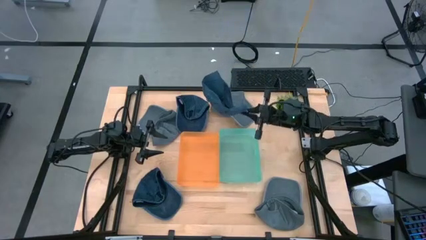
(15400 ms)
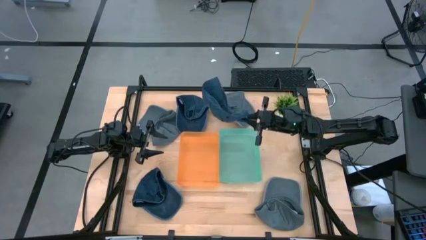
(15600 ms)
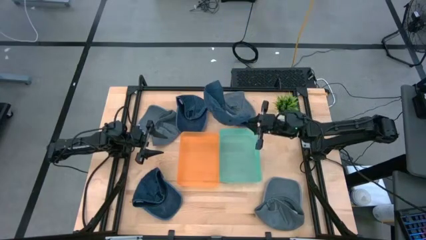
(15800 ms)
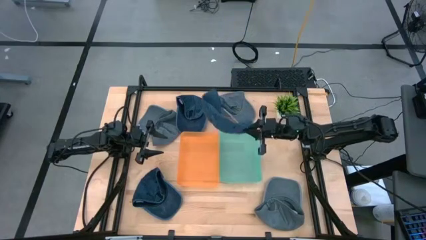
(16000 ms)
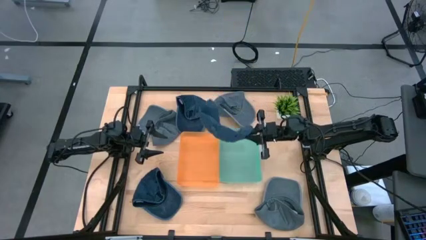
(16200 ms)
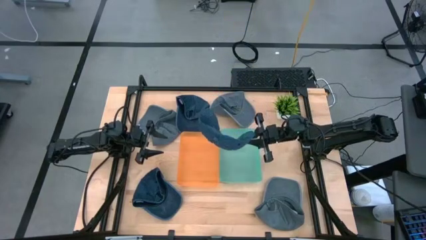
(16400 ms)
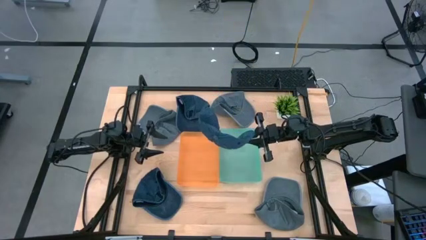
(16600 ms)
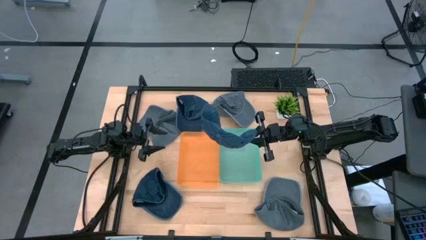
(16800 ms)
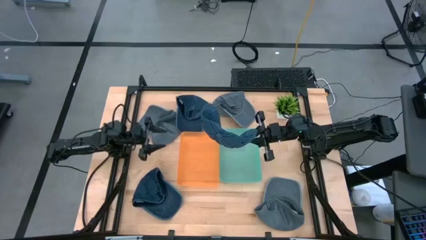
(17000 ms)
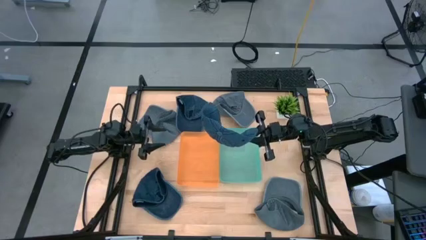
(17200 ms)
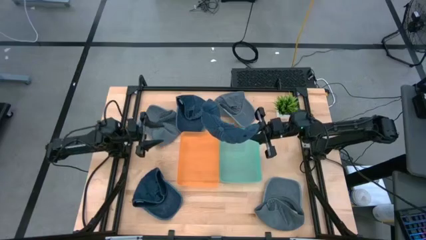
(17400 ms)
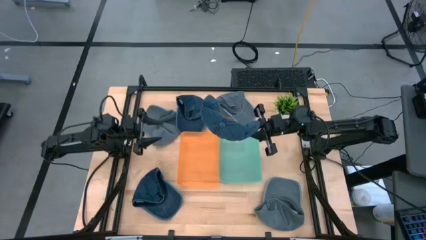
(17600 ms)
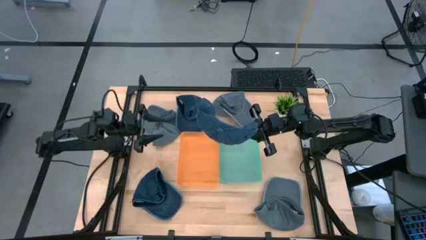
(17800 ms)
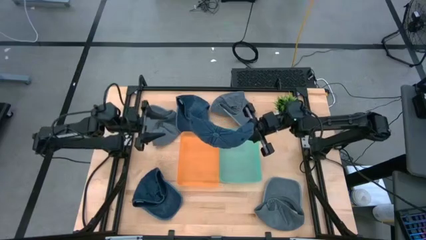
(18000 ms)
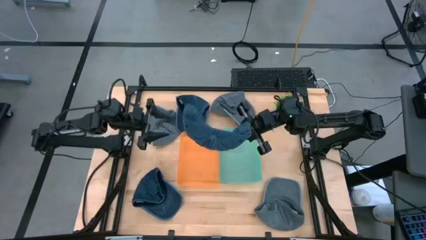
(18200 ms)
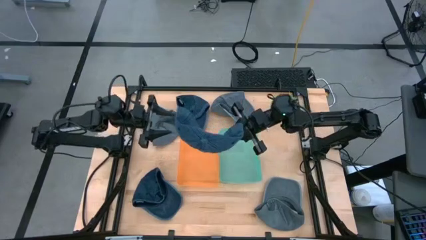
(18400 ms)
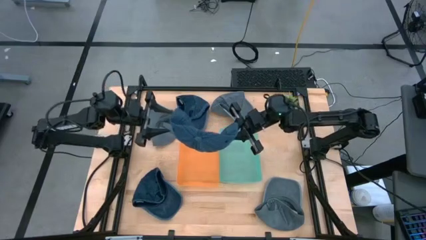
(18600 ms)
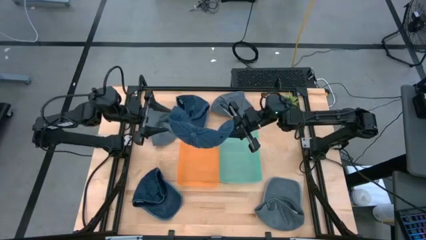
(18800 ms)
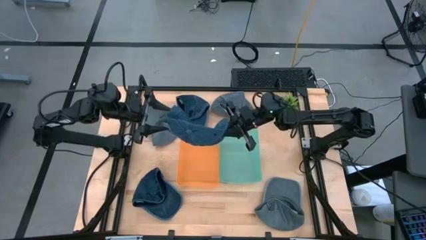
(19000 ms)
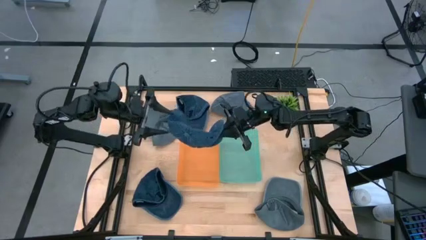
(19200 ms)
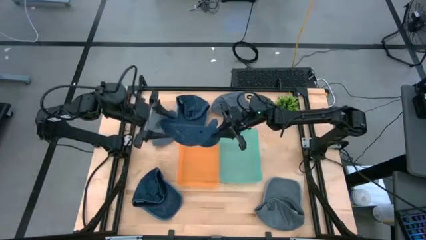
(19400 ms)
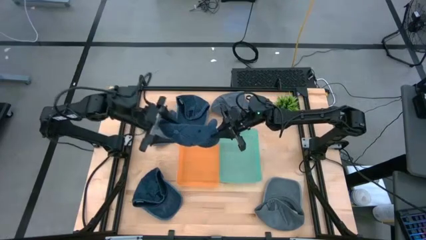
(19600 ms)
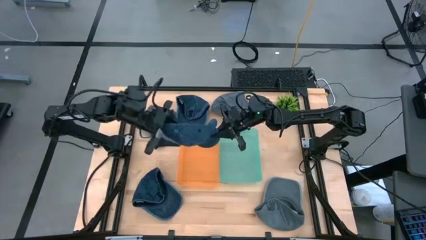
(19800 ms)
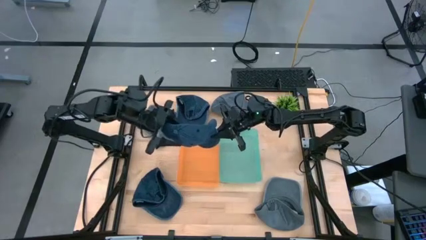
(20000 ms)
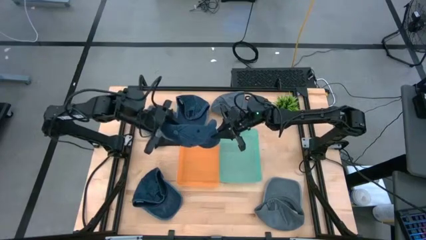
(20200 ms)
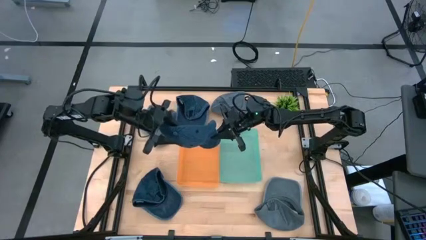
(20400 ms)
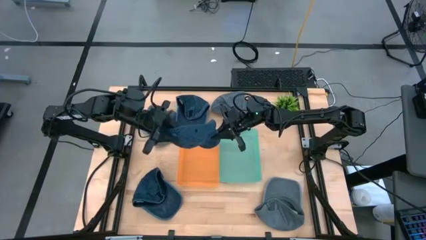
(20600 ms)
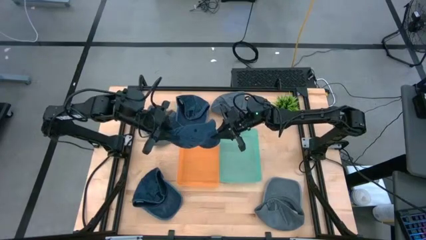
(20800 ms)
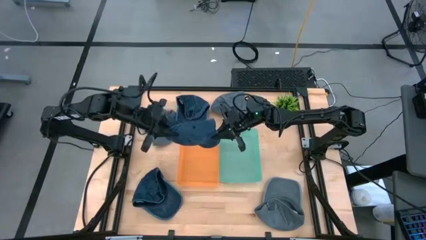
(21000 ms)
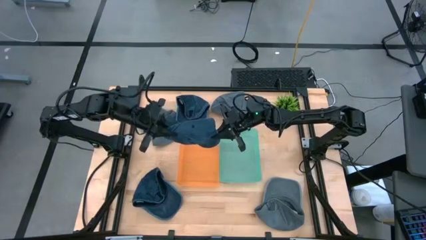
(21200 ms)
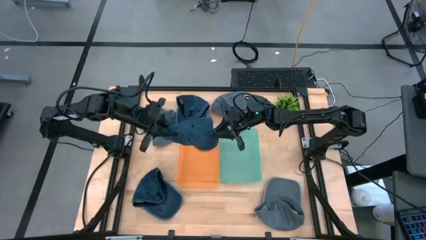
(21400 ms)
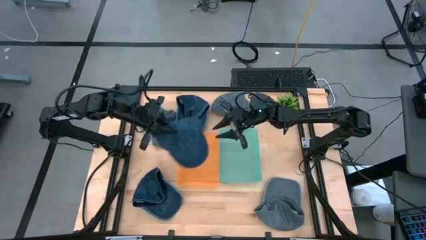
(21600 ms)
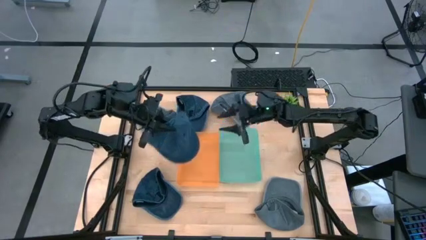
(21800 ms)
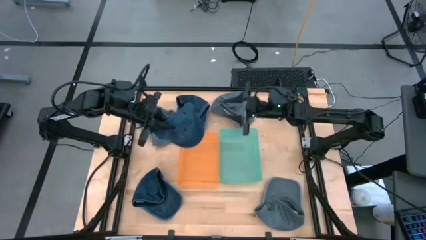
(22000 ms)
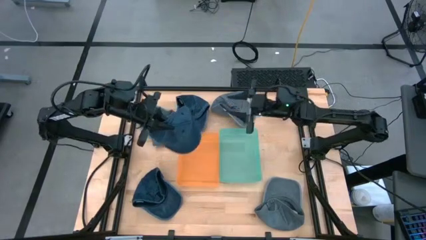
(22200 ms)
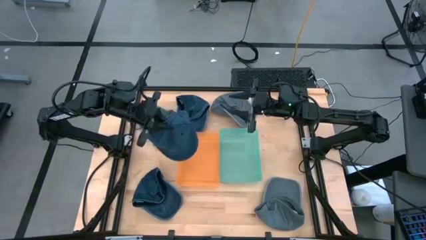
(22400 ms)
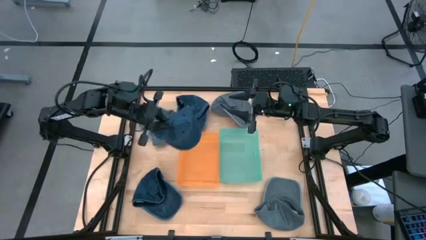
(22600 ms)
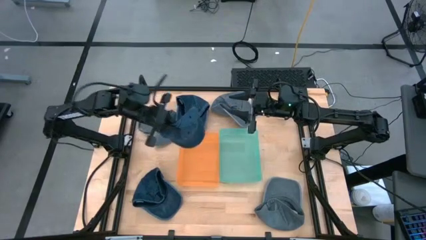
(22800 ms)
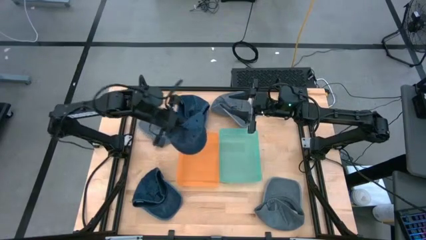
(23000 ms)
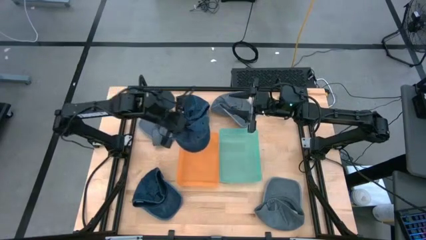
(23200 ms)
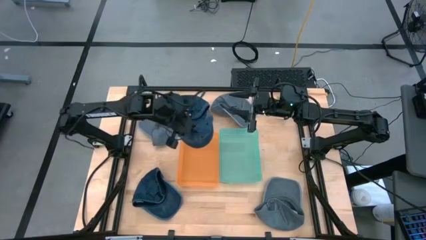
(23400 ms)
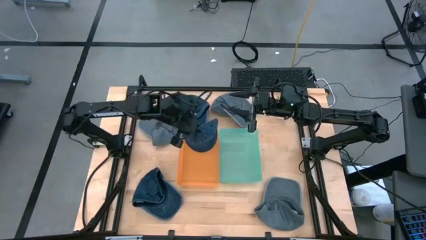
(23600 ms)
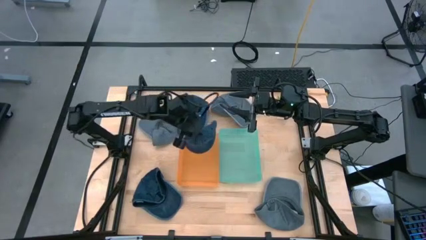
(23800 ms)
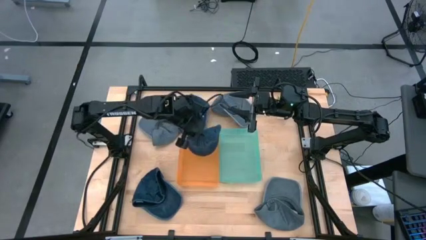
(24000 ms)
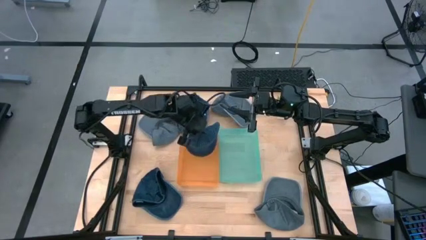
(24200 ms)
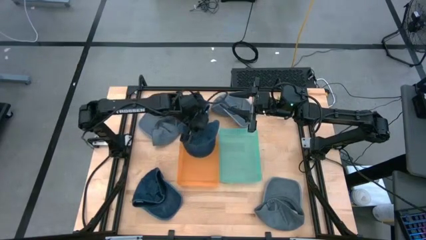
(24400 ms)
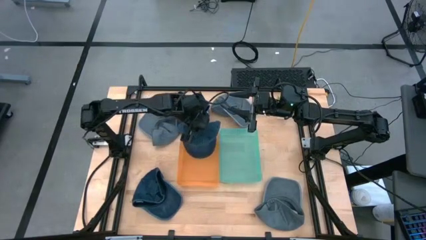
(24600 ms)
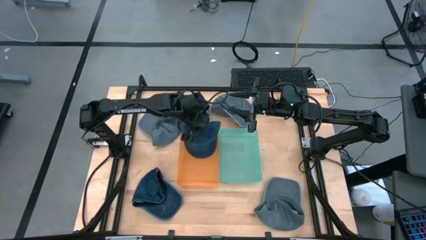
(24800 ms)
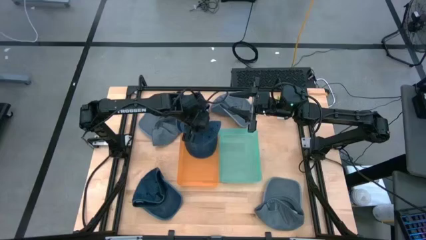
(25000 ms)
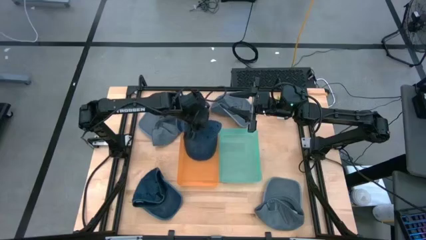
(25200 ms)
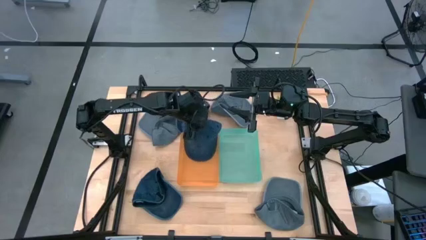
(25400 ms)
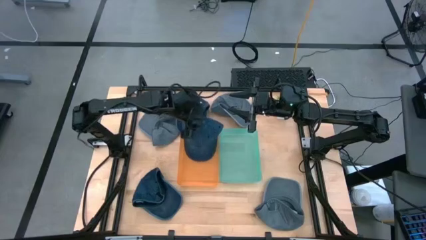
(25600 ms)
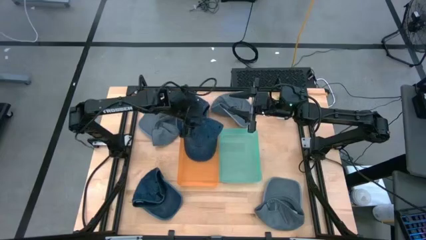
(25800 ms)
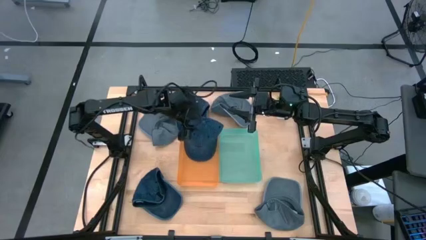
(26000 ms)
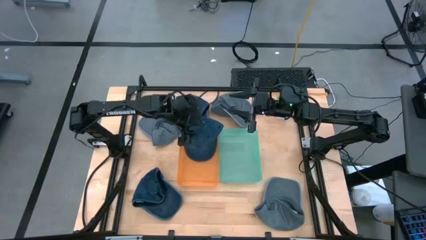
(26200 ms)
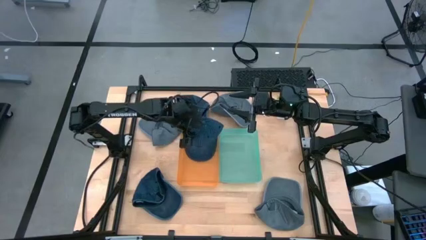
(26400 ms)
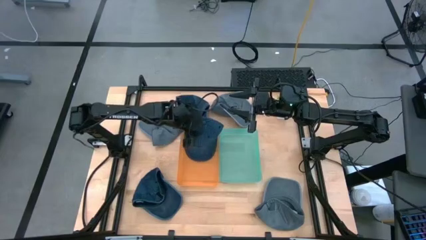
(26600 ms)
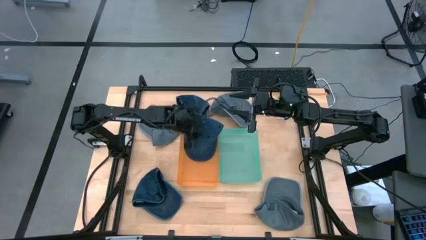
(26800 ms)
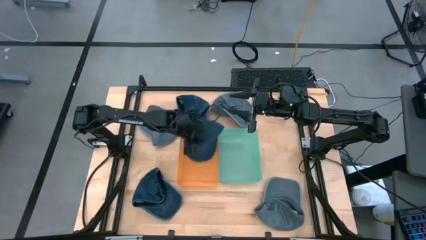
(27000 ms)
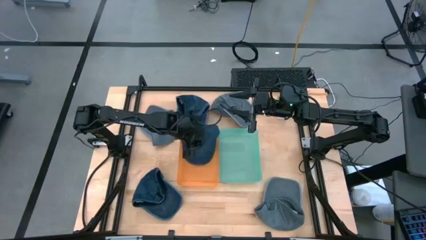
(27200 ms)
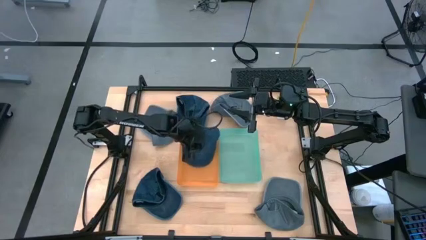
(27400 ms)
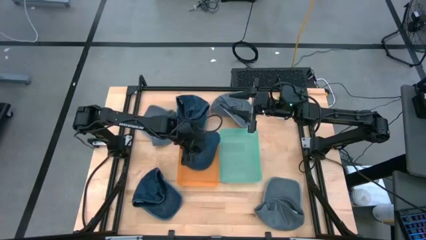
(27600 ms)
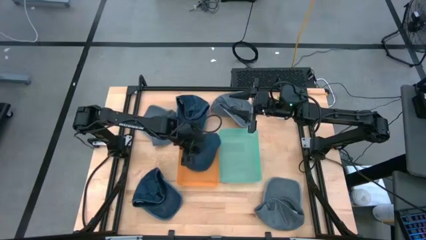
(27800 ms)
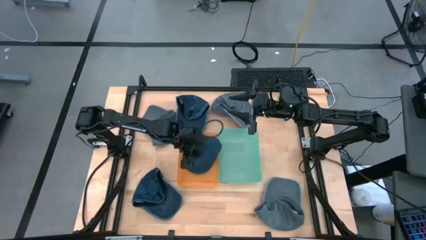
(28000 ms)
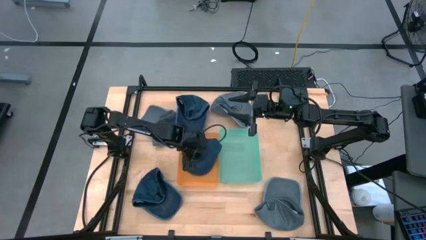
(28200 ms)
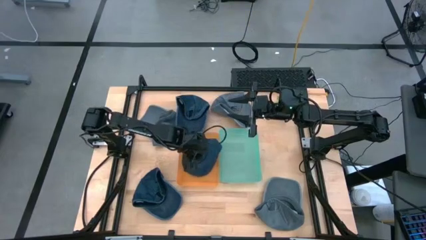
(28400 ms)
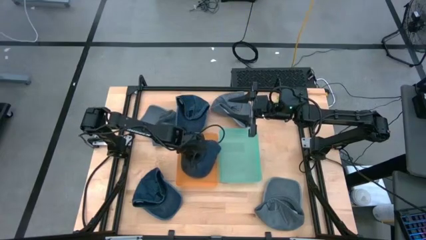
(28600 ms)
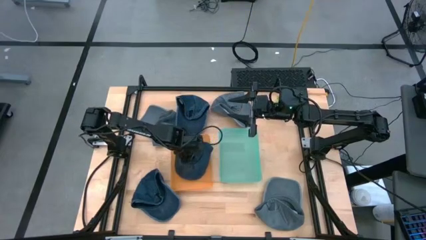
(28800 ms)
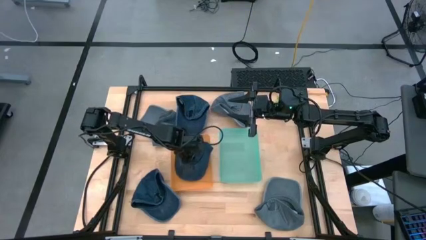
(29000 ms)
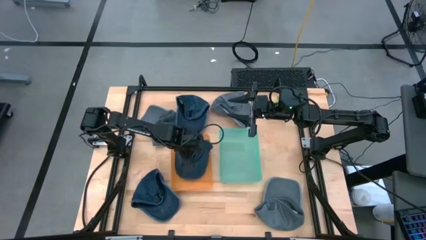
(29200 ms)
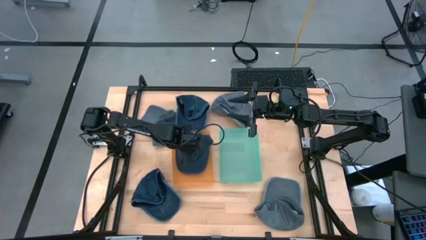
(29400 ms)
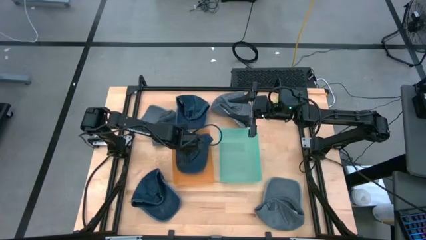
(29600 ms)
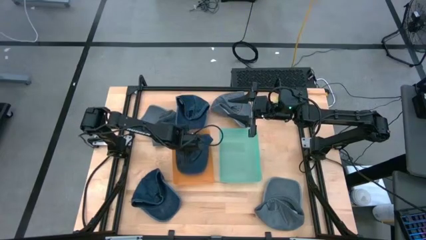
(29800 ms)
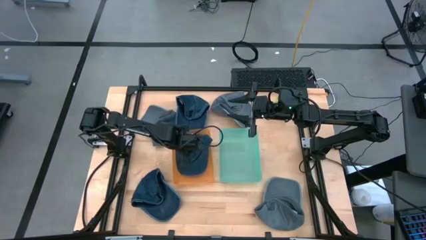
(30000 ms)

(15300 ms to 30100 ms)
Task: Pick & Place hat
Put the top right blue cap into the orange bin
